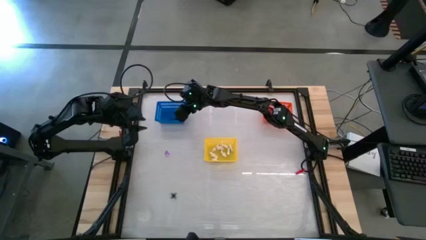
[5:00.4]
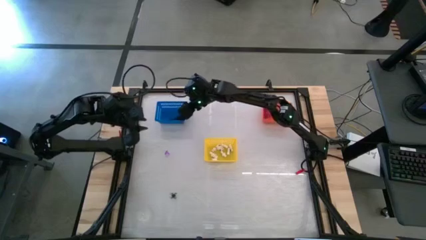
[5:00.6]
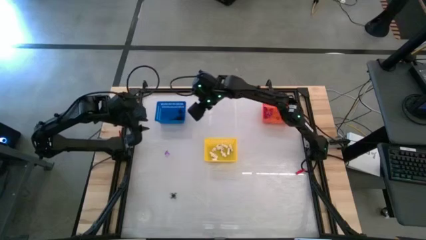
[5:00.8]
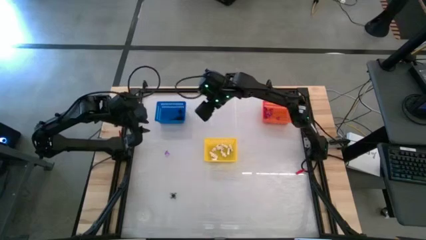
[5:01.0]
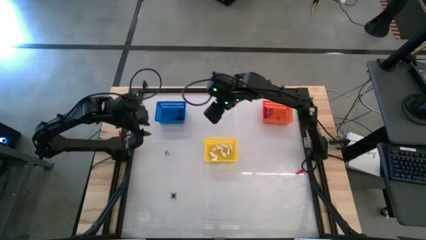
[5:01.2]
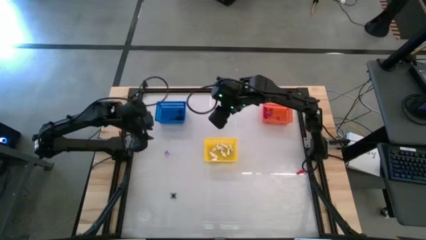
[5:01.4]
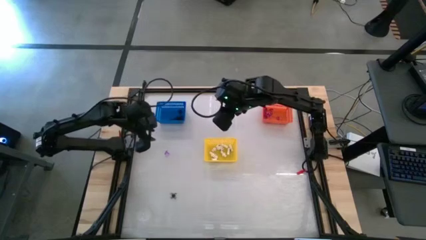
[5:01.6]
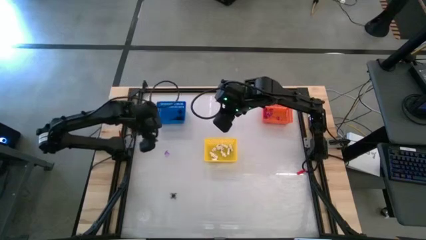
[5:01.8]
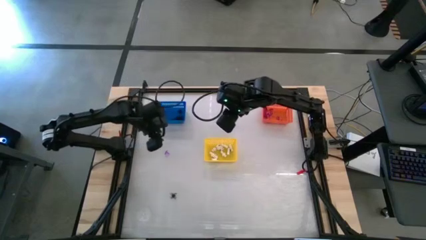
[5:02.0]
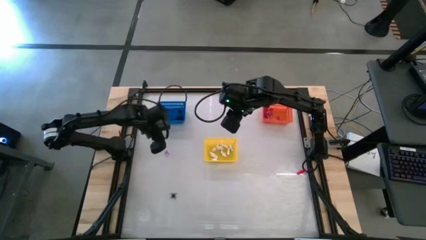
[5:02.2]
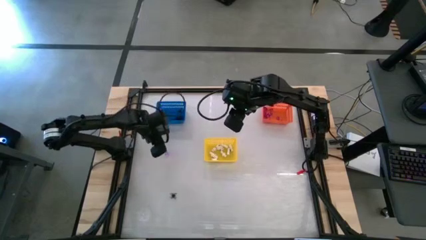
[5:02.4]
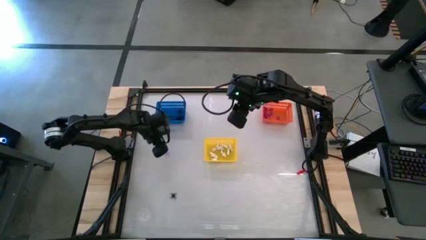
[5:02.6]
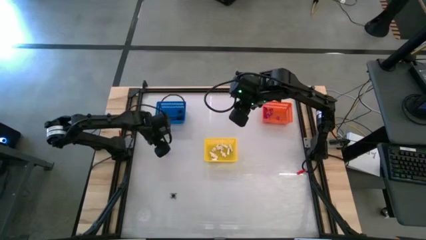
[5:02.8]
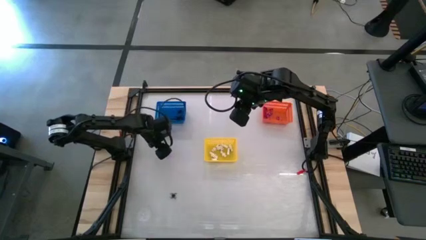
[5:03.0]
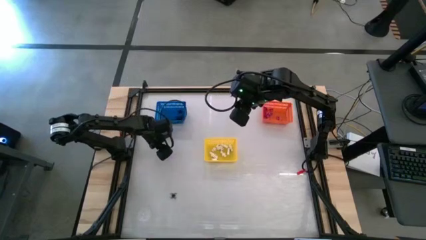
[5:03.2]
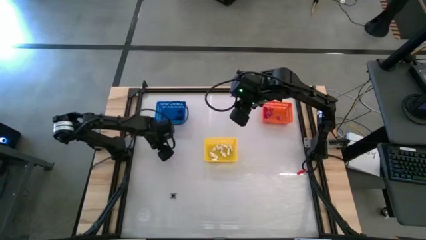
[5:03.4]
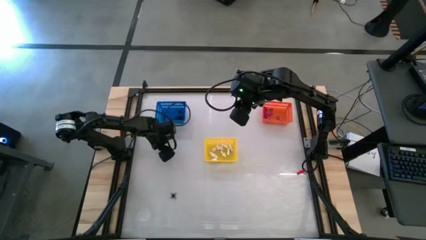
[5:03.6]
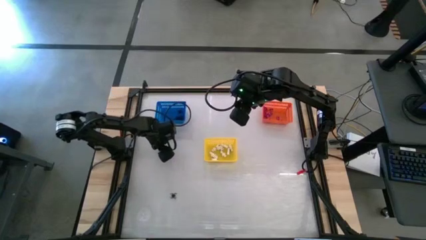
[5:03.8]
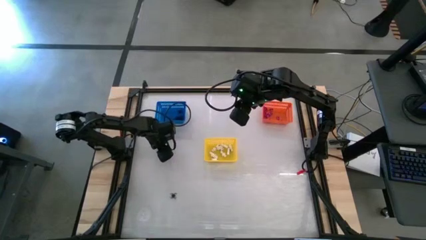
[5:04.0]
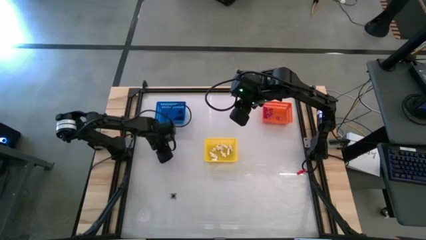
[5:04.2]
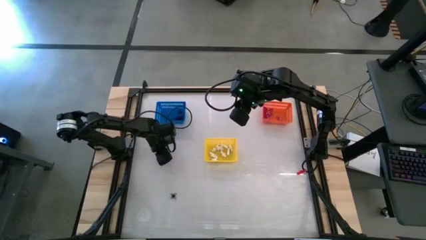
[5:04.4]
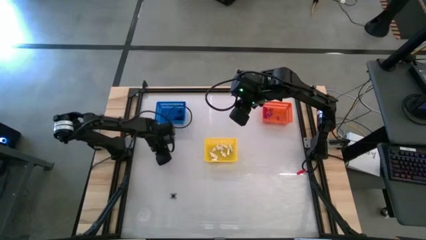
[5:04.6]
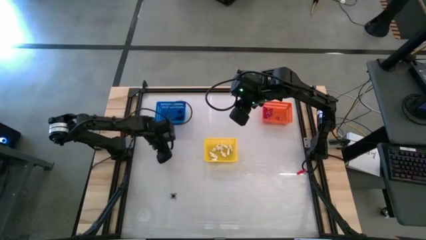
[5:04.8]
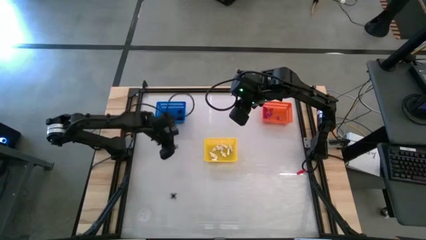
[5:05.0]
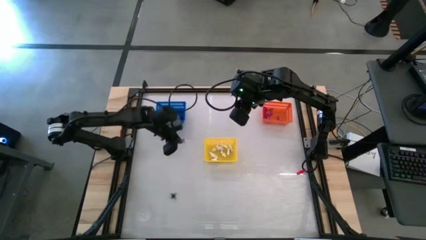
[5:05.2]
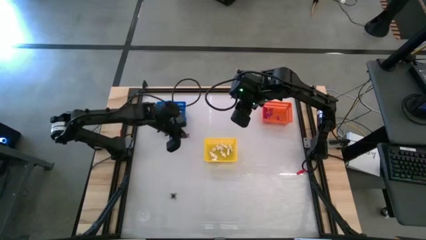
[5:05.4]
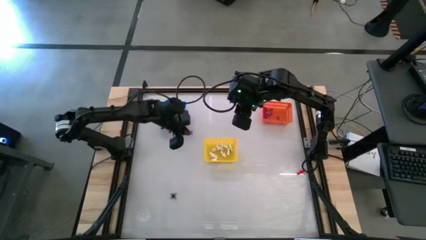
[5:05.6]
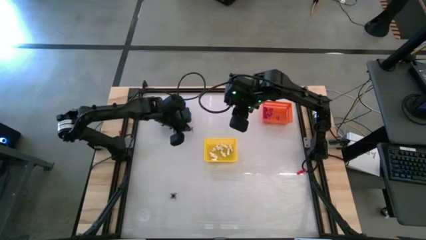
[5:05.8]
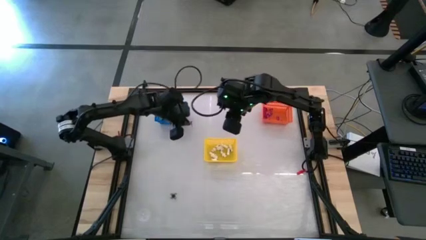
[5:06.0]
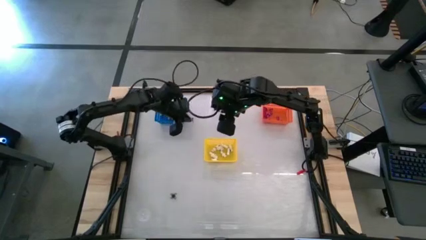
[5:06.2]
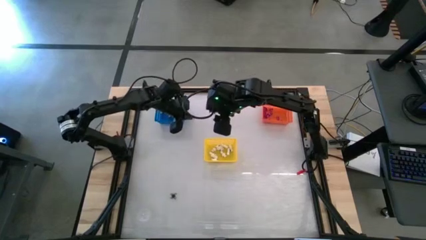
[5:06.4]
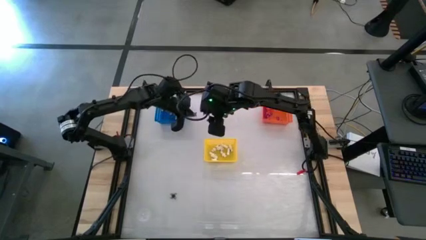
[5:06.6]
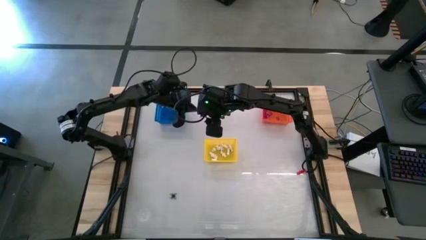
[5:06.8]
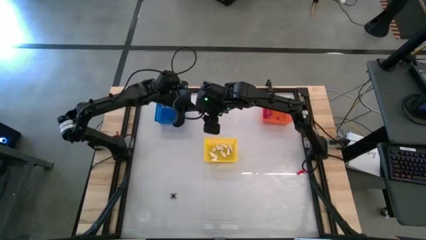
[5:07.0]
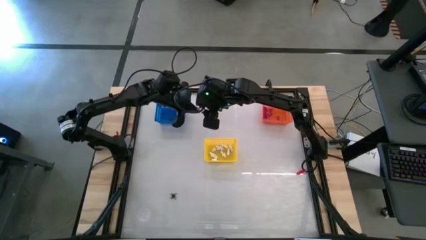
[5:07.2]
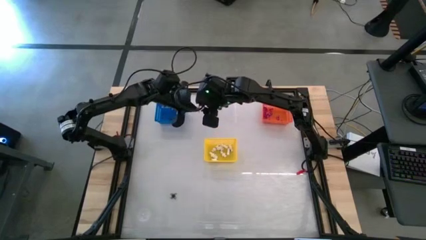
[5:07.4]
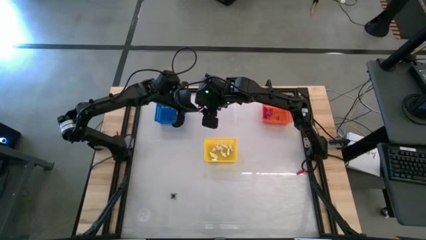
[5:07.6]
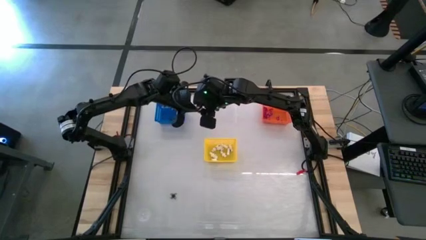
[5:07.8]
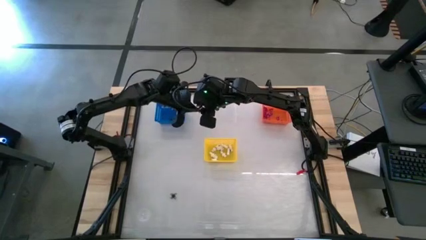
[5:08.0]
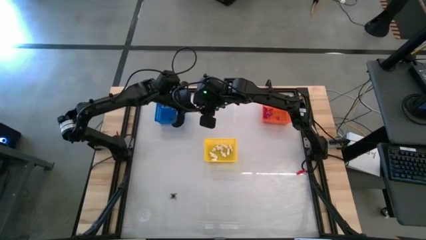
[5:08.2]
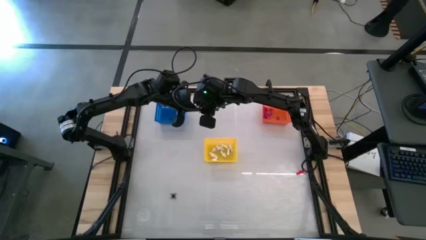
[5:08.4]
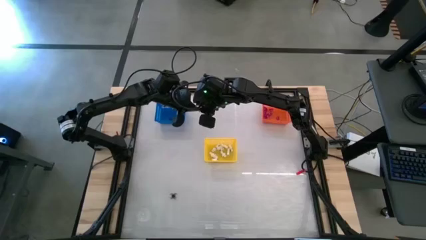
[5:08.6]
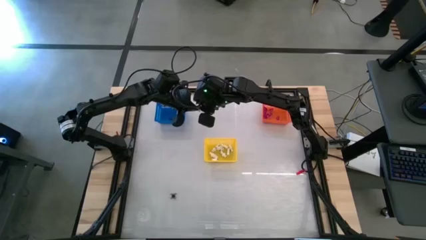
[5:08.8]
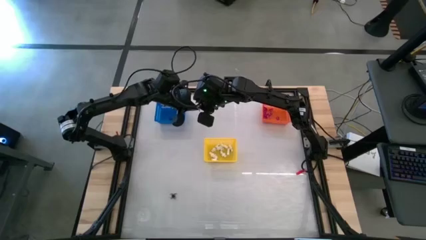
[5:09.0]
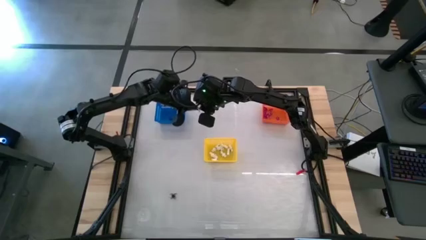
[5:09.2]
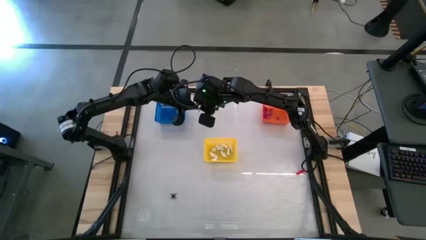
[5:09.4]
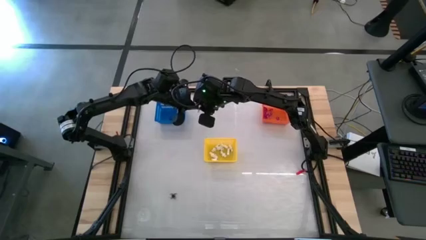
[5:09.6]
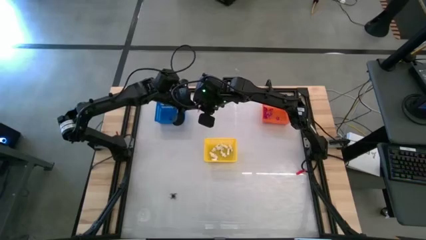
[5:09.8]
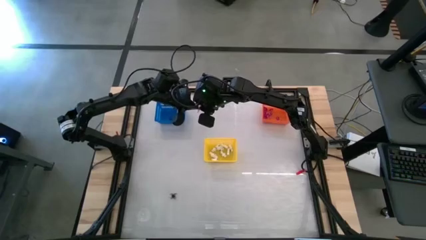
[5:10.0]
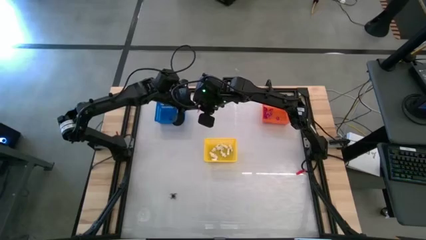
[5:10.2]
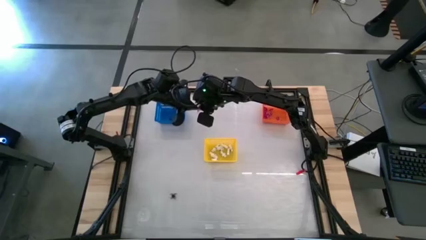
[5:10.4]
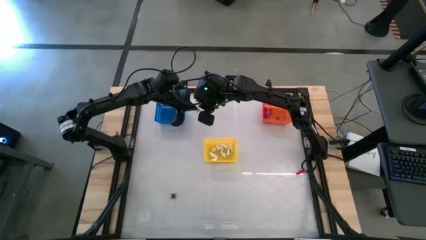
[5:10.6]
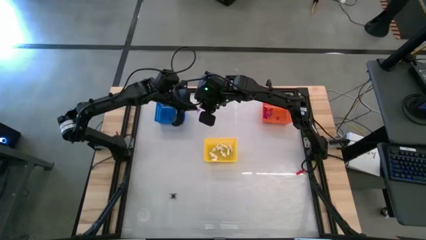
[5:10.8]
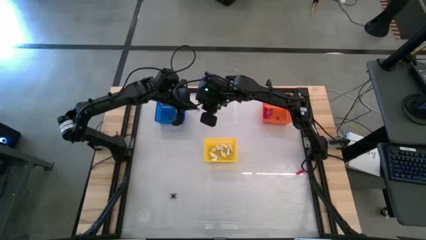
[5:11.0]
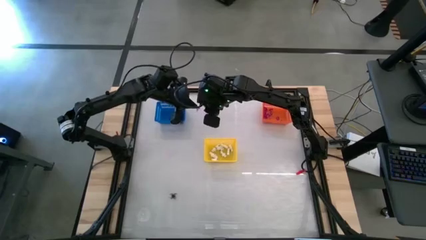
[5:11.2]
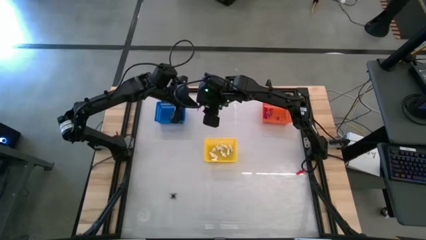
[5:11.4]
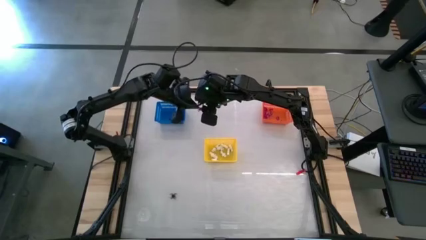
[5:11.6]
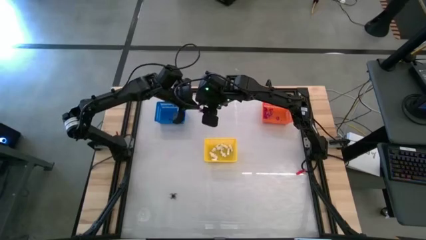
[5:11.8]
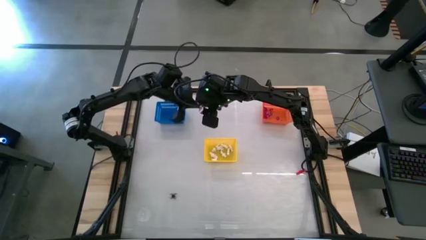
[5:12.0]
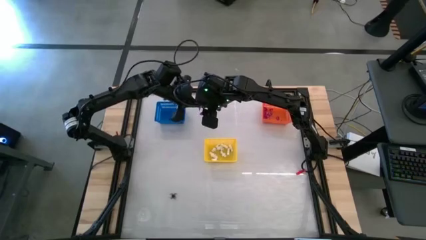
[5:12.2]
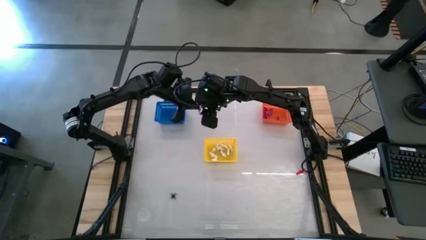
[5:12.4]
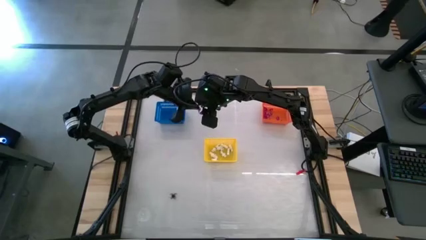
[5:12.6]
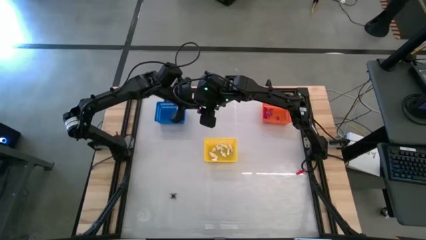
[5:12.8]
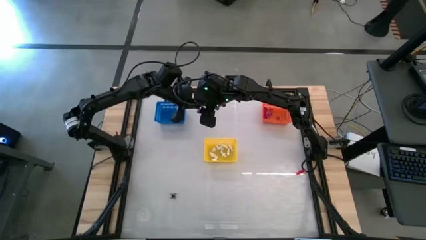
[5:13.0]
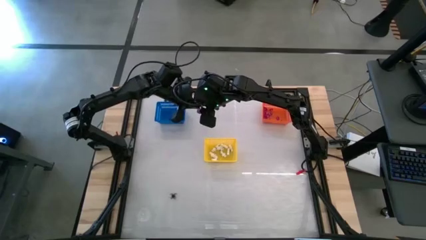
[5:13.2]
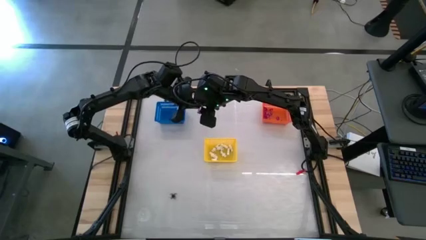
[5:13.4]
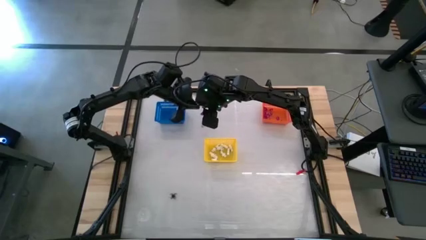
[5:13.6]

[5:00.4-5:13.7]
Task: Sort Halloween decoration
Put the purple witch hat toy into the orange bin
